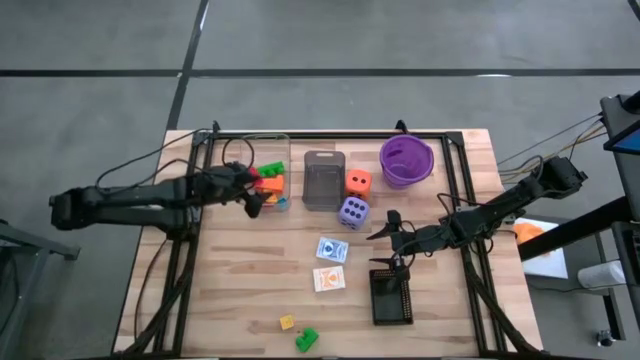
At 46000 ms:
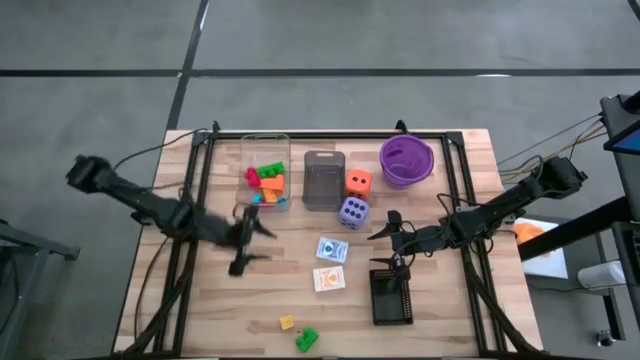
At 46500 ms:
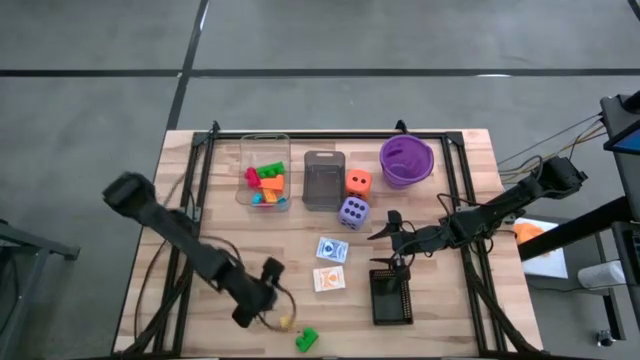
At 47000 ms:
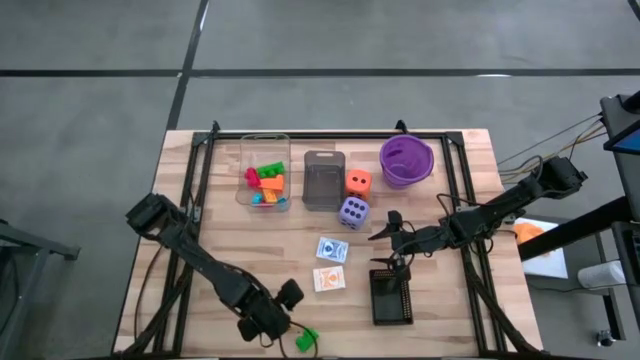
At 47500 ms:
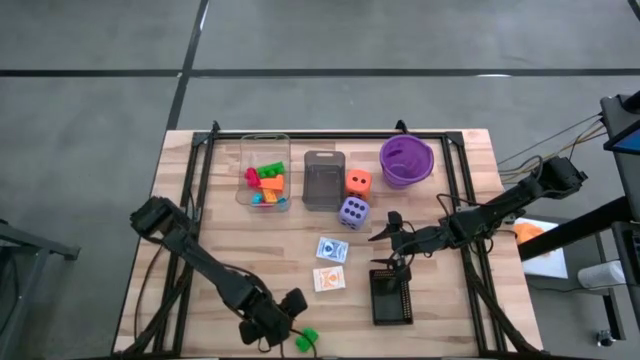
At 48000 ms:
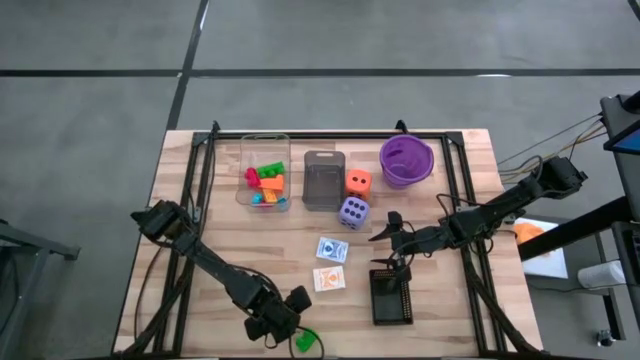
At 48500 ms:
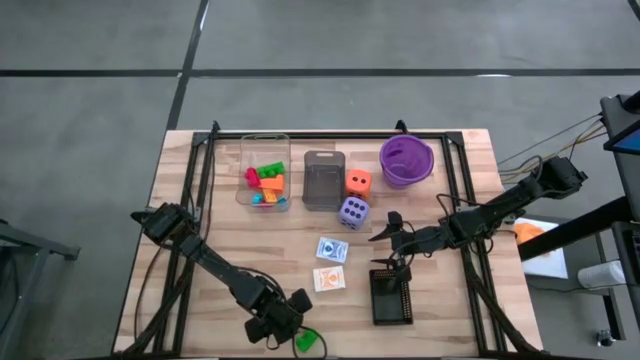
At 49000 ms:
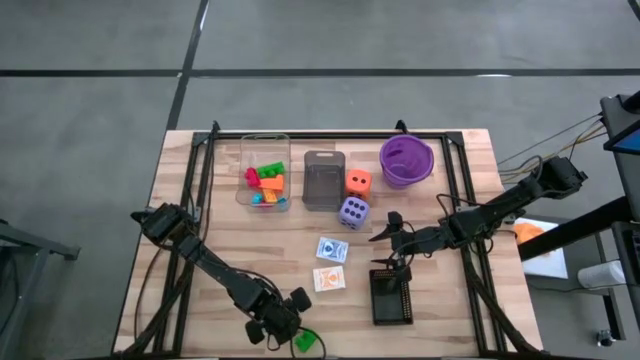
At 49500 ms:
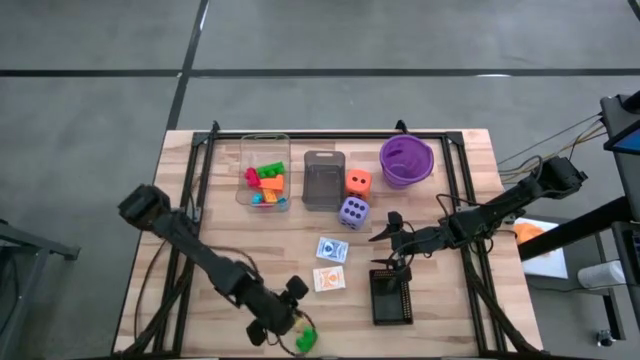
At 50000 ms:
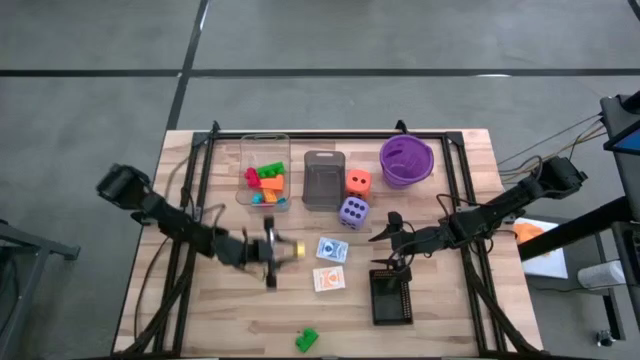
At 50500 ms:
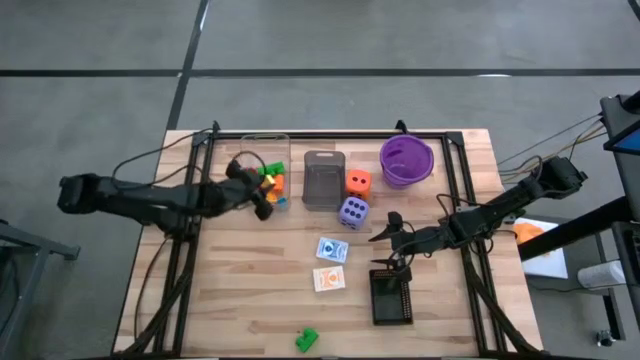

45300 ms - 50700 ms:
Task: Pick & Place Toys
Put the light yellow game piece into the transparent bin

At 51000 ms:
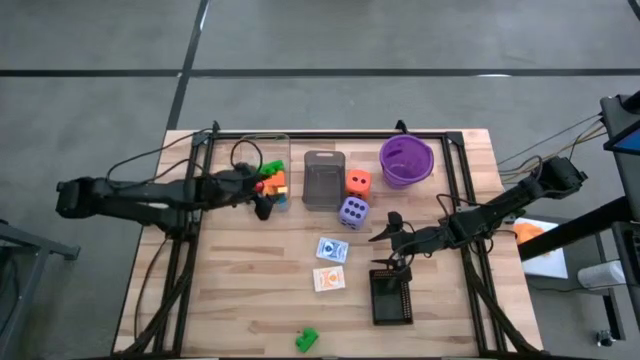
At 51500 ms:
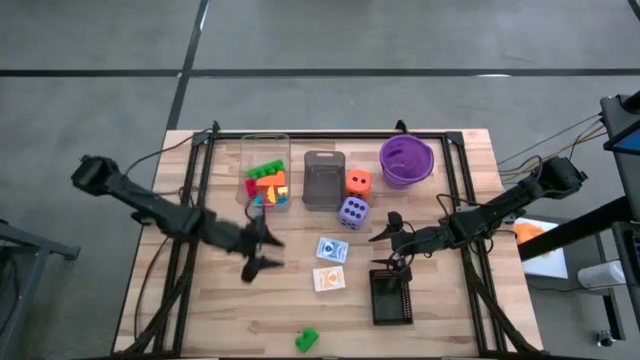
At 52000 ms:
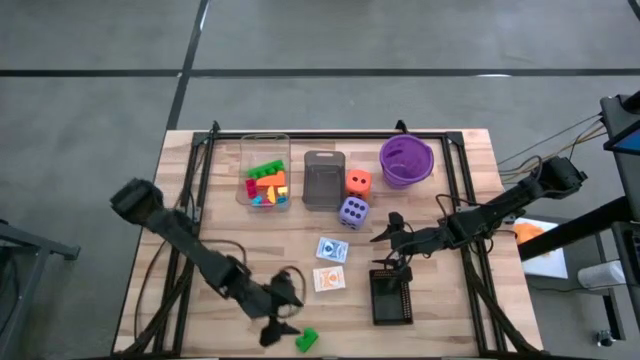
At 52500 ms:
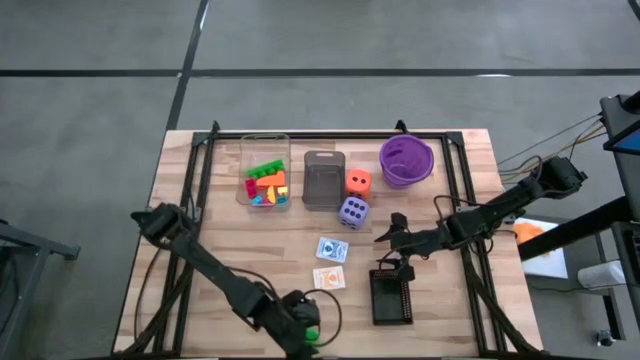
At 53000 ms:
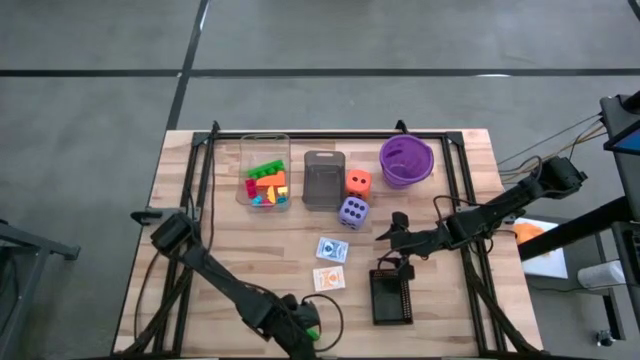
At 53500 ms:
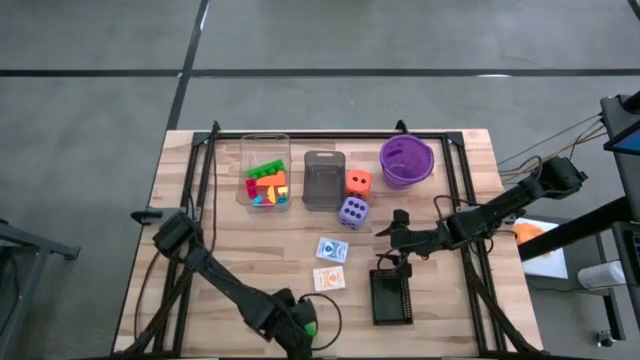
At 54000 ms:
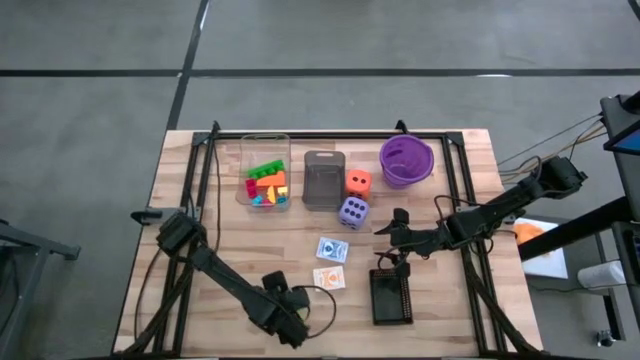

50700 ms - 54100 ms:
Put the green game piece into the transparent bin

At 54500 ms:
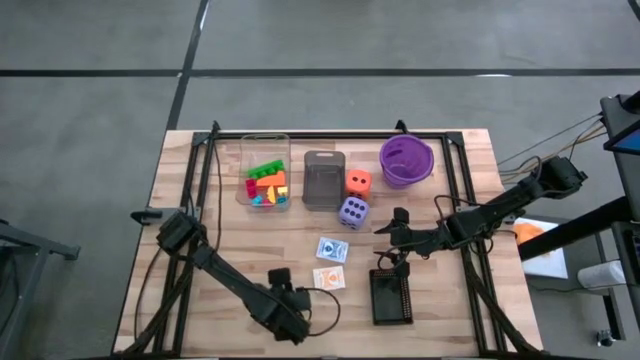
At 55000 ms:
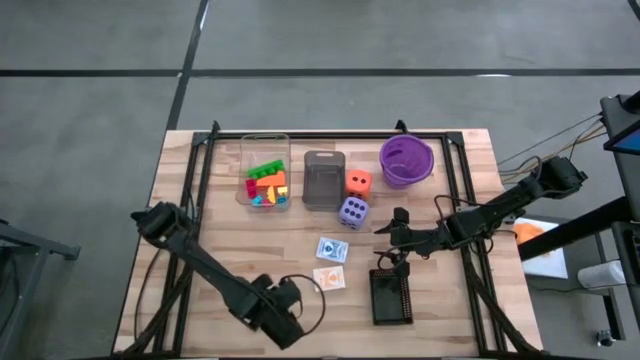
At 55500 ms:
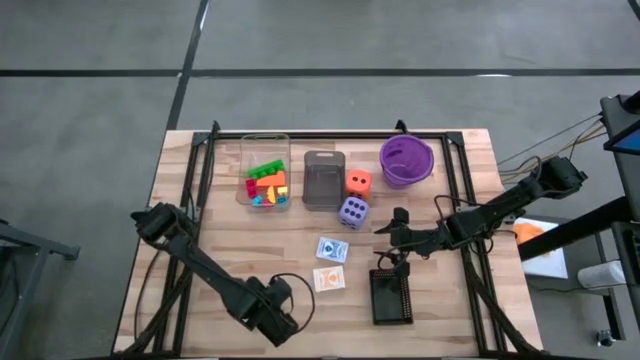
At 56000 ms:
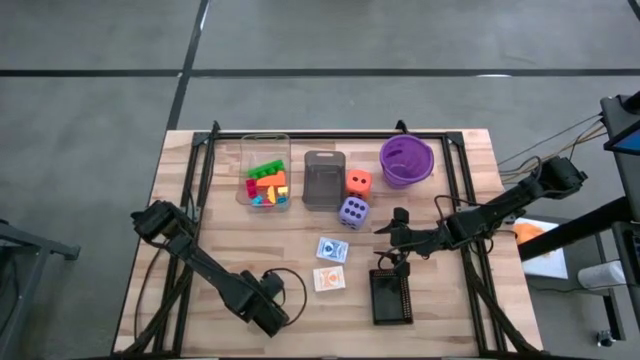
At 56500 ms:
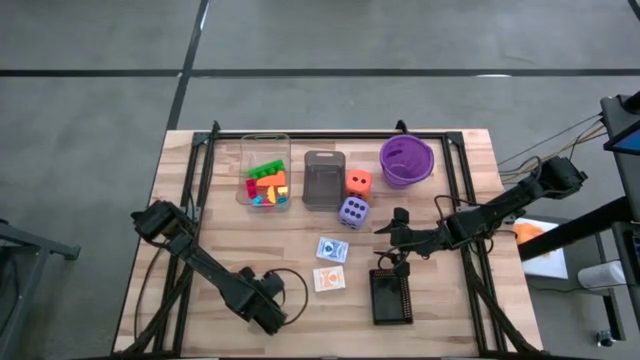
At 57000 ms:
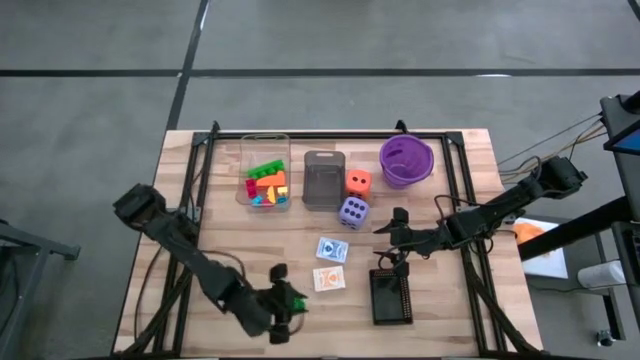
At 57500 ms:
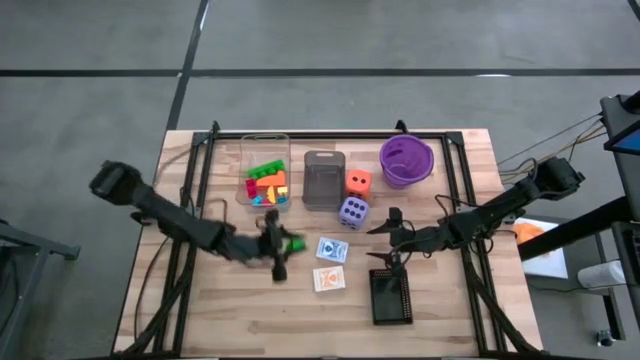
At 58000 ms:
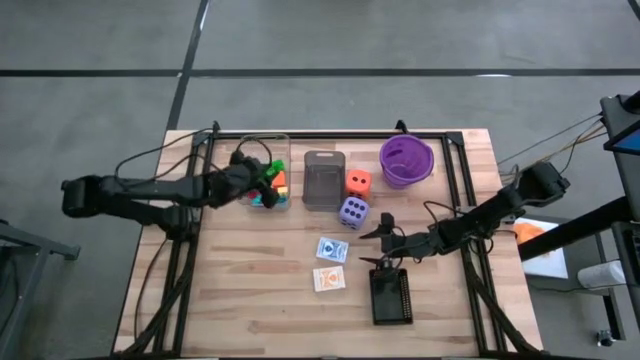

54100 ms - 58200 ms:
Put the green game piece into the transparent bin

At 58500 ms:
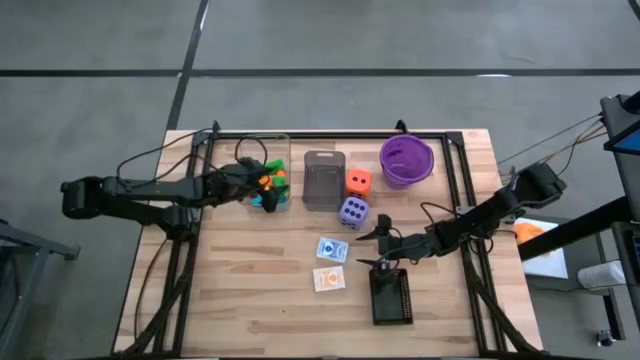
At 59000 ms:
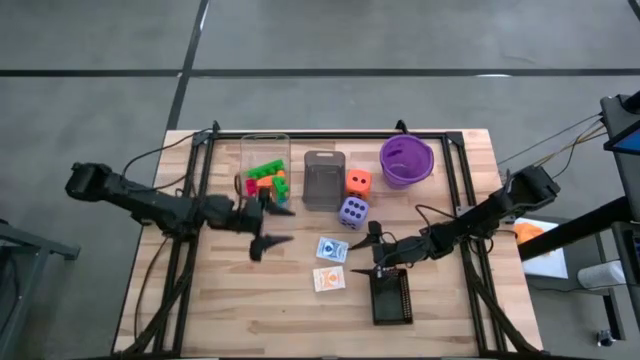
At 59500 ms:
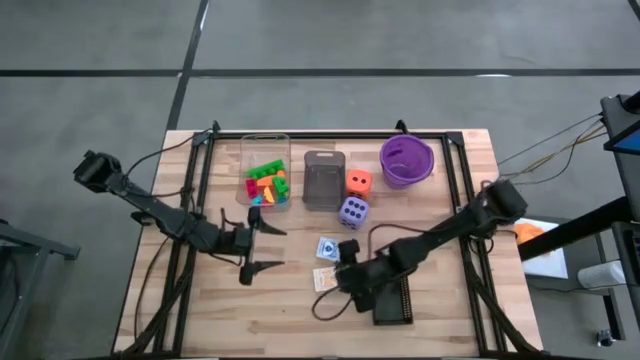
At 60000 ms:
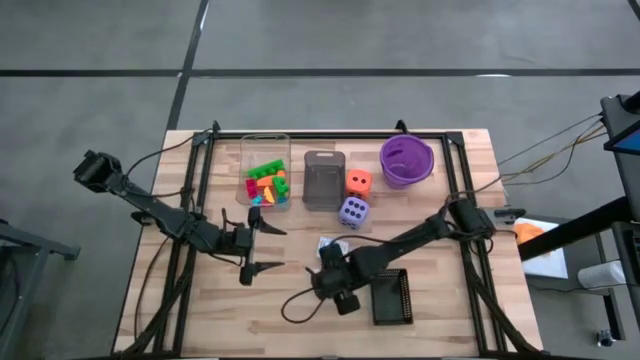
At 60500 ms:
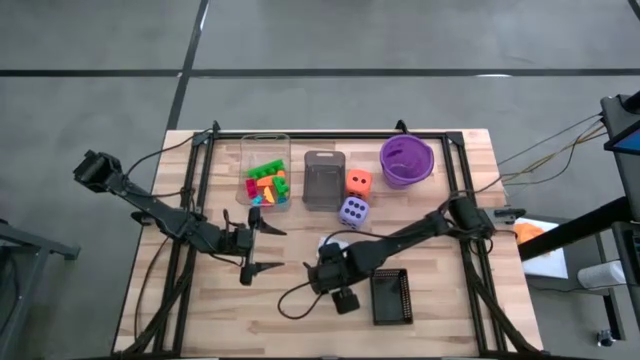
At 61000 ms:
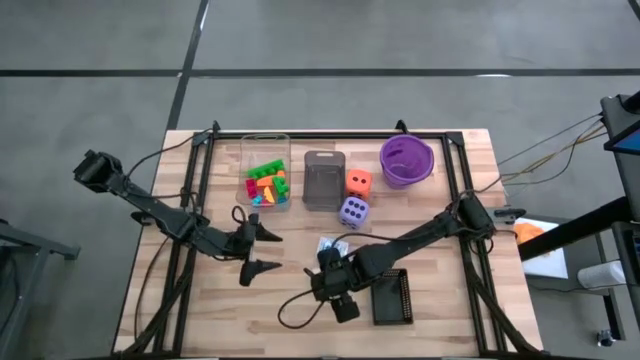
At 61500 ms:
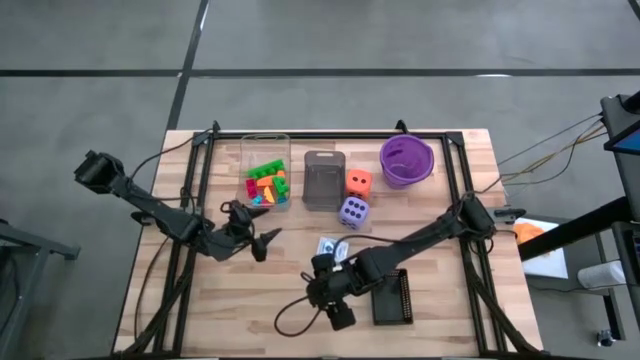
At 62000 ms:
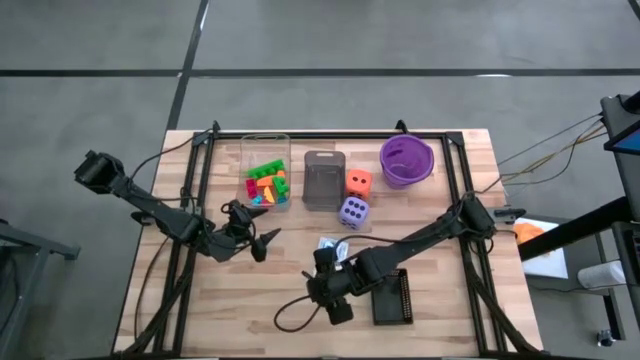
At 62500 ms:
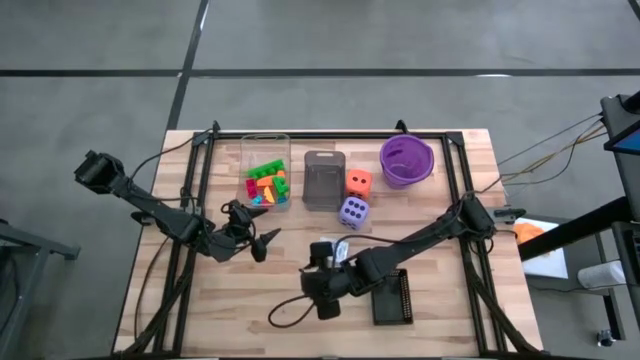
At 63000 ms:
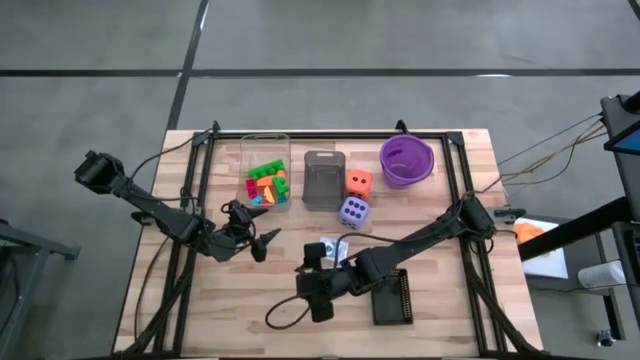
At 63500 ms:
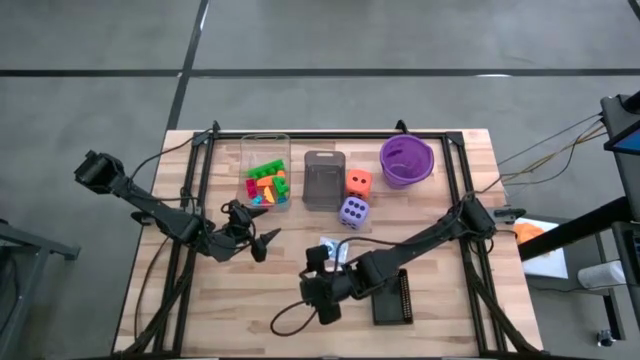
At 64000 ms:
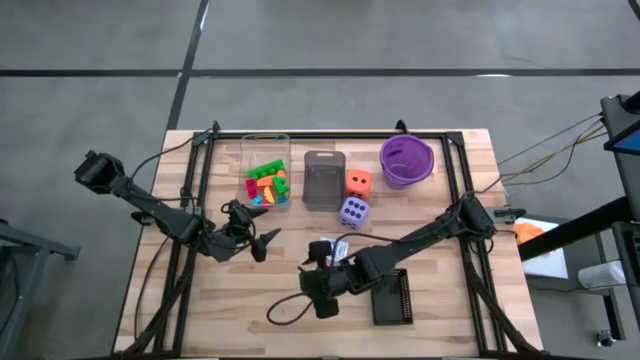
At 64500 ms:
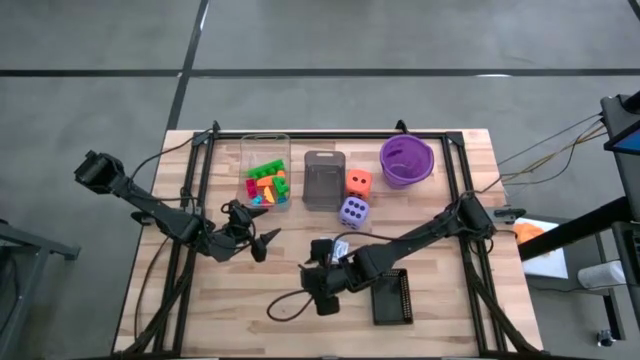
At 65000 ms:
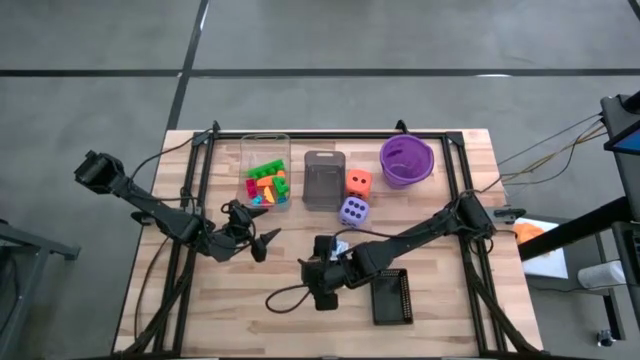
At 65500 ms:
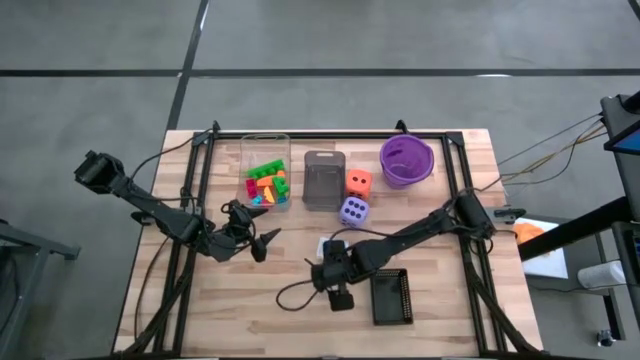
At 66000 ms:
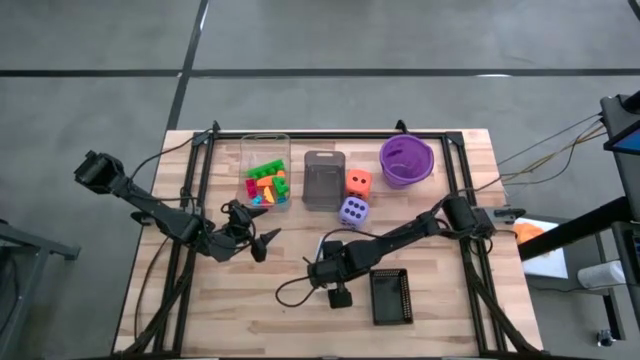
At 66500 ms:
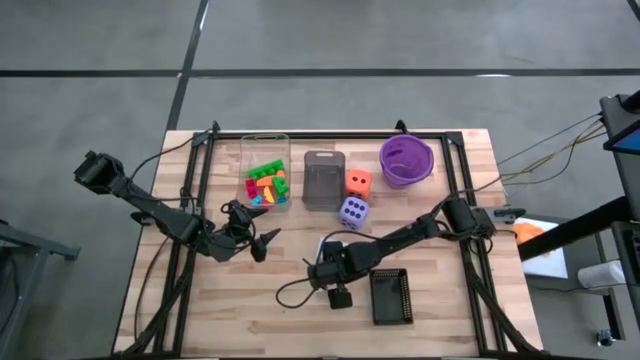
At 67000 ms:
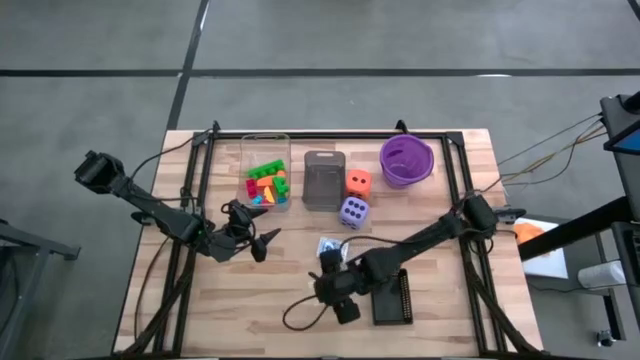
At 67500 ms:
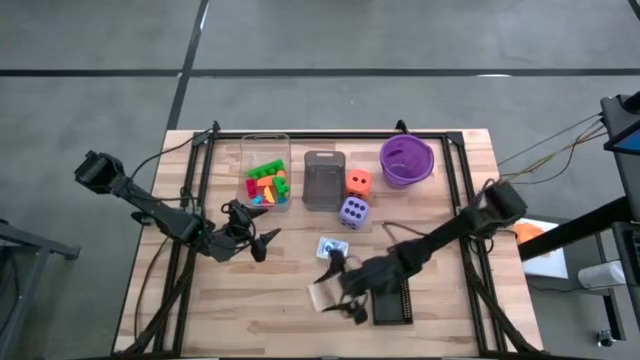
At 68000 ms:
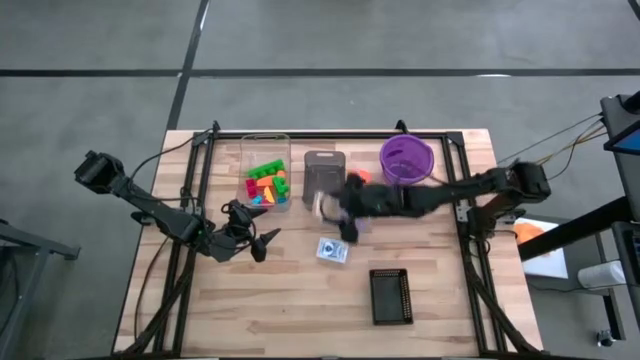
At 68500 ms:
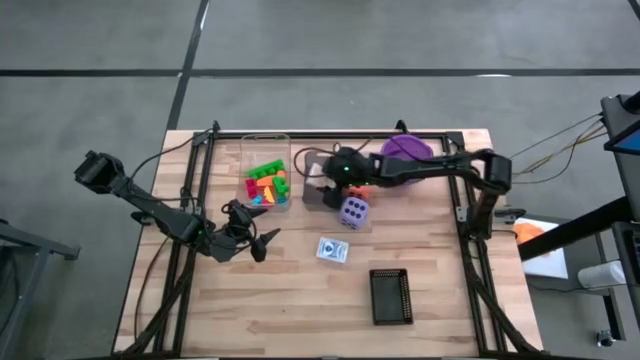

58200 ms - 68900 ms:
Put the orange playing card box into the gray bin
